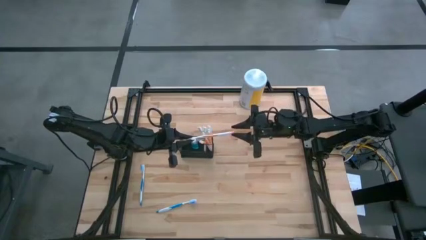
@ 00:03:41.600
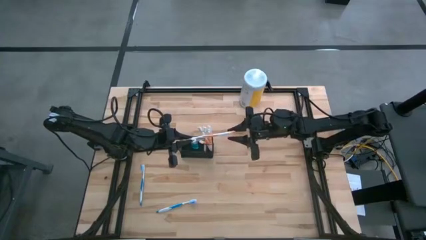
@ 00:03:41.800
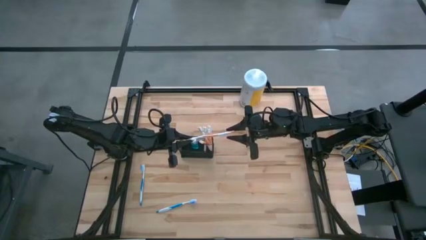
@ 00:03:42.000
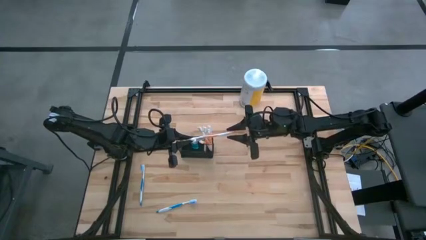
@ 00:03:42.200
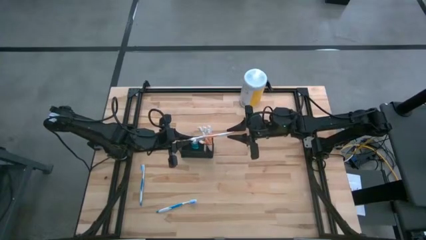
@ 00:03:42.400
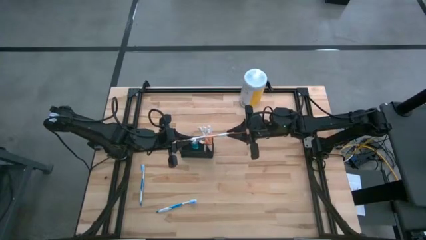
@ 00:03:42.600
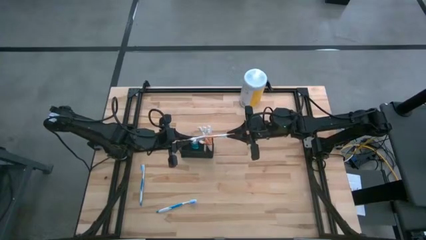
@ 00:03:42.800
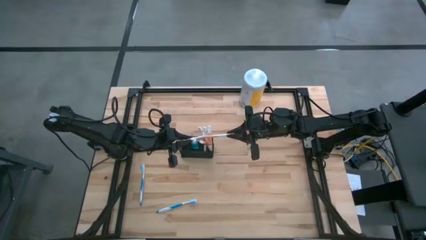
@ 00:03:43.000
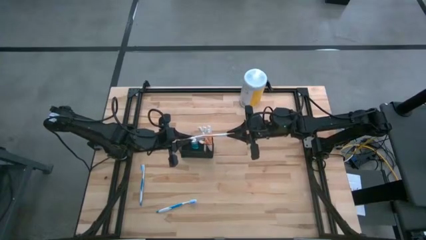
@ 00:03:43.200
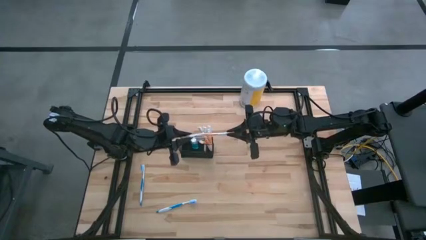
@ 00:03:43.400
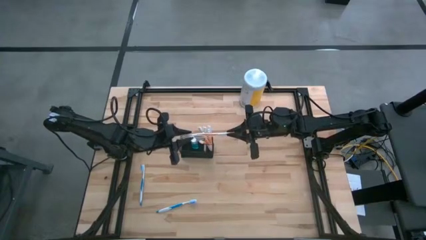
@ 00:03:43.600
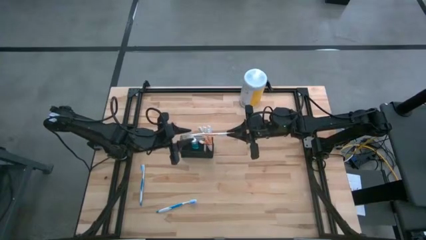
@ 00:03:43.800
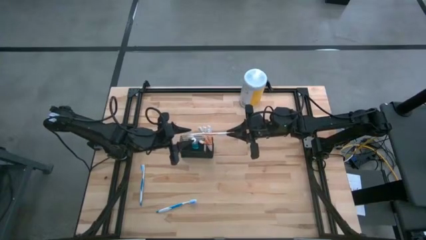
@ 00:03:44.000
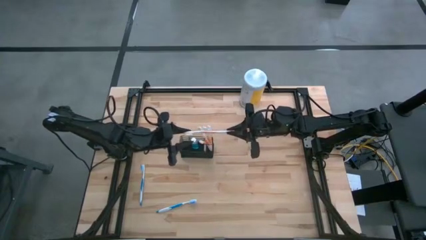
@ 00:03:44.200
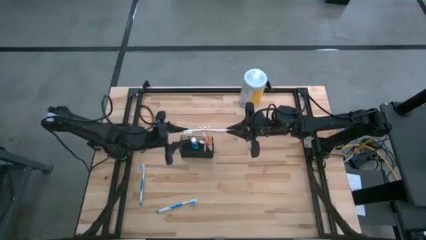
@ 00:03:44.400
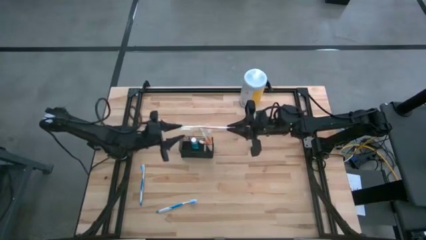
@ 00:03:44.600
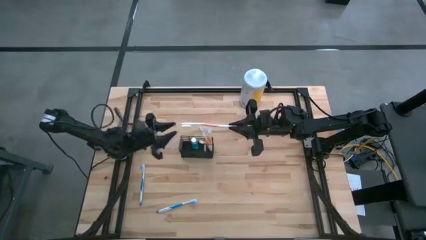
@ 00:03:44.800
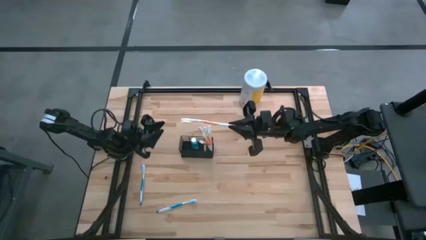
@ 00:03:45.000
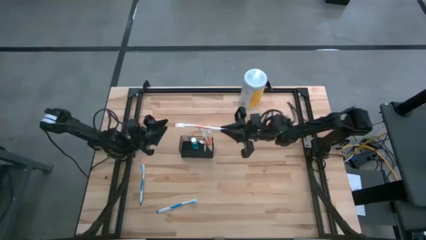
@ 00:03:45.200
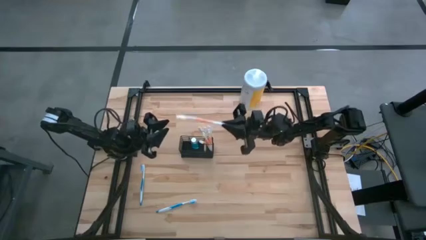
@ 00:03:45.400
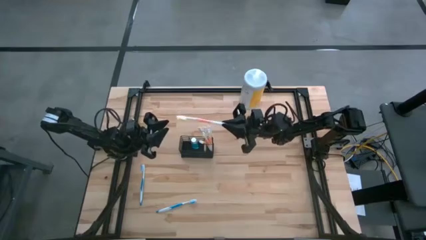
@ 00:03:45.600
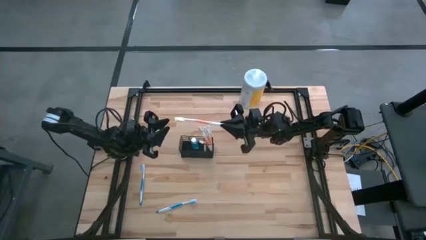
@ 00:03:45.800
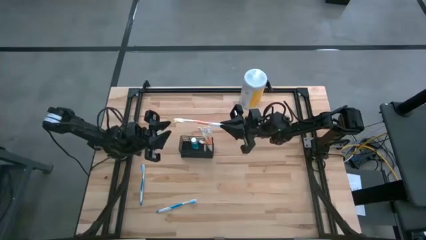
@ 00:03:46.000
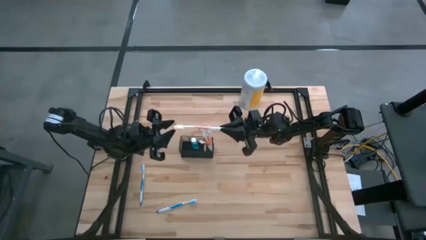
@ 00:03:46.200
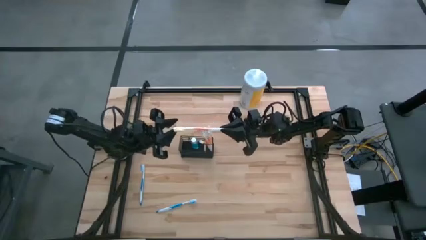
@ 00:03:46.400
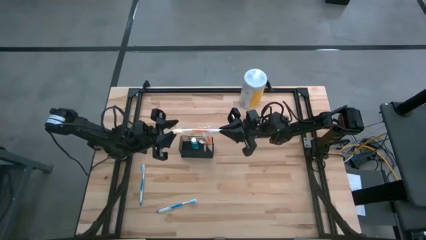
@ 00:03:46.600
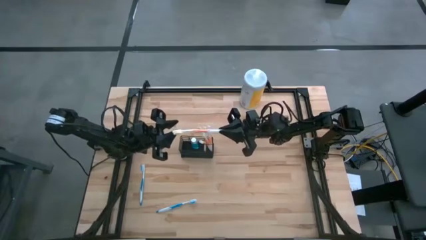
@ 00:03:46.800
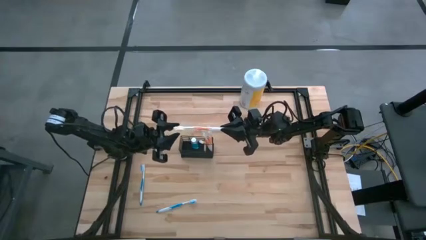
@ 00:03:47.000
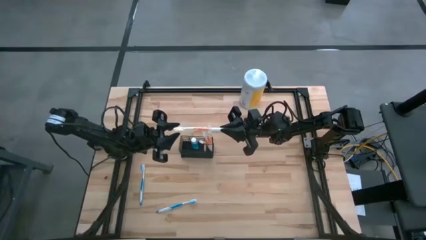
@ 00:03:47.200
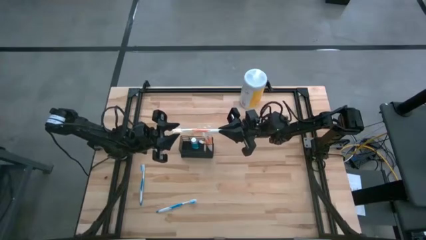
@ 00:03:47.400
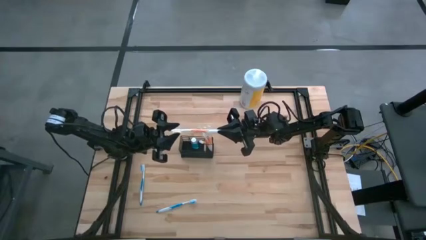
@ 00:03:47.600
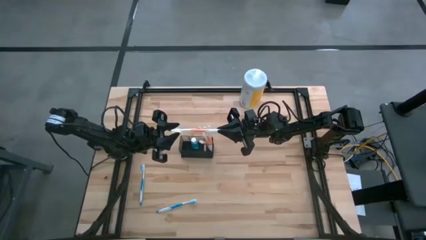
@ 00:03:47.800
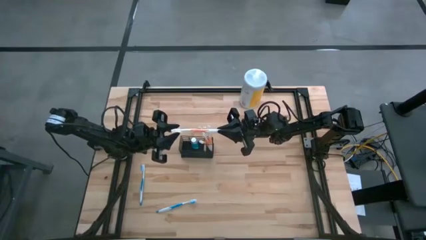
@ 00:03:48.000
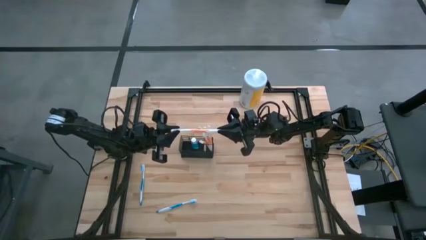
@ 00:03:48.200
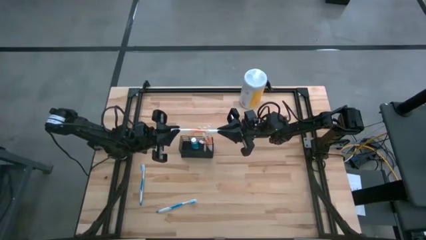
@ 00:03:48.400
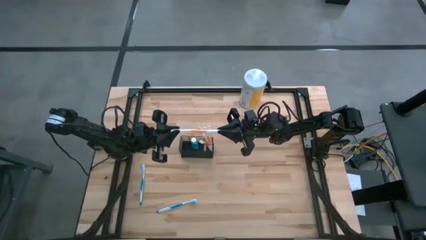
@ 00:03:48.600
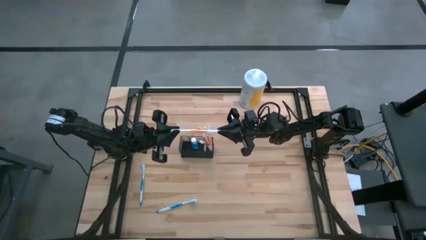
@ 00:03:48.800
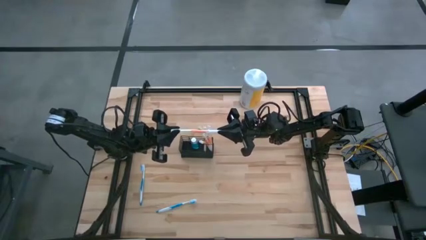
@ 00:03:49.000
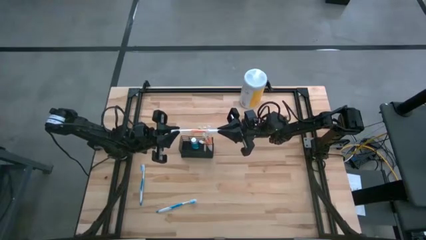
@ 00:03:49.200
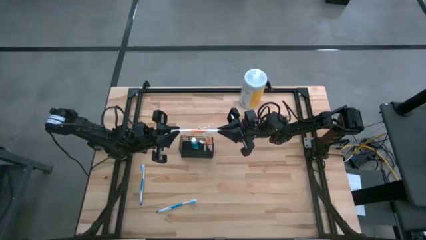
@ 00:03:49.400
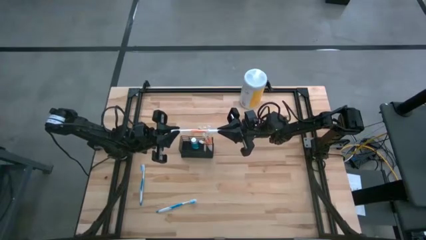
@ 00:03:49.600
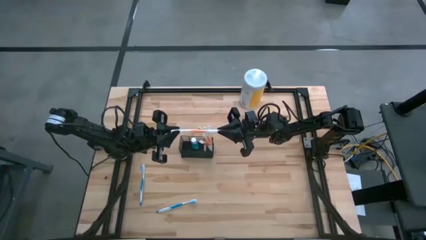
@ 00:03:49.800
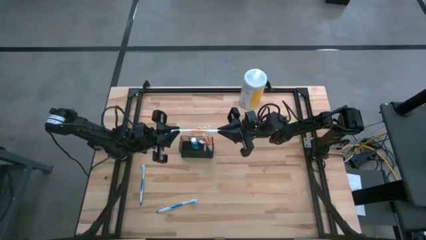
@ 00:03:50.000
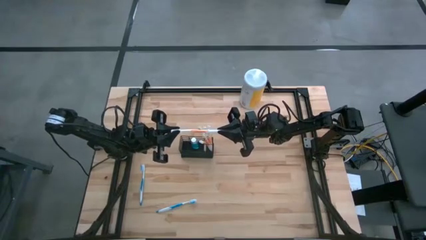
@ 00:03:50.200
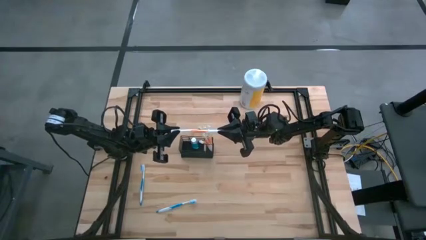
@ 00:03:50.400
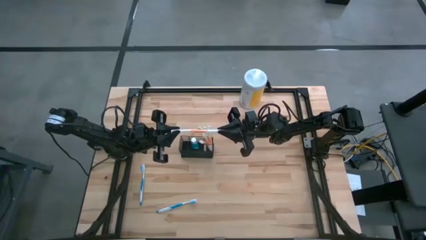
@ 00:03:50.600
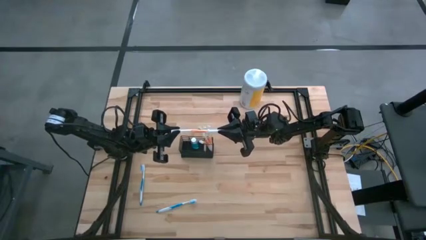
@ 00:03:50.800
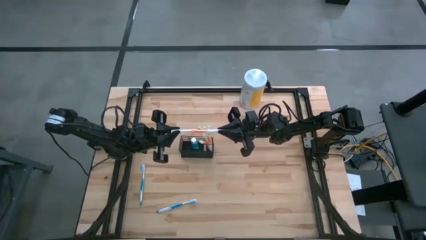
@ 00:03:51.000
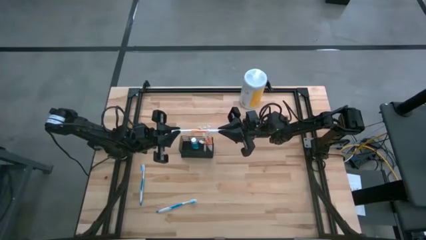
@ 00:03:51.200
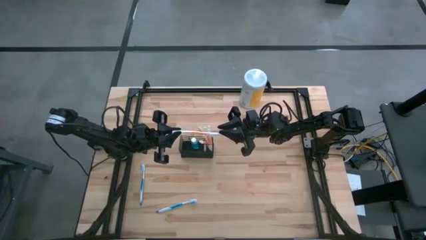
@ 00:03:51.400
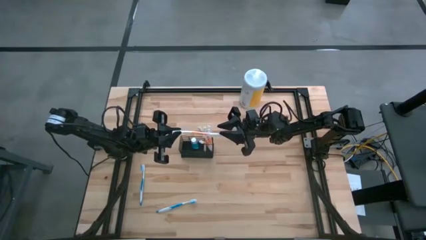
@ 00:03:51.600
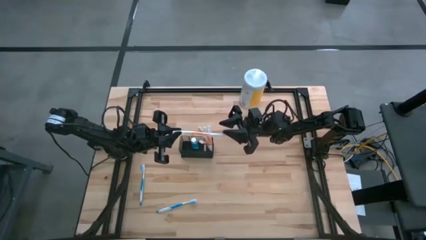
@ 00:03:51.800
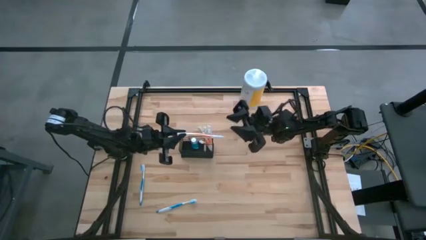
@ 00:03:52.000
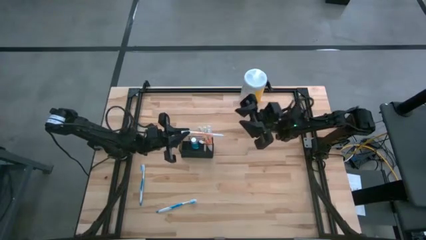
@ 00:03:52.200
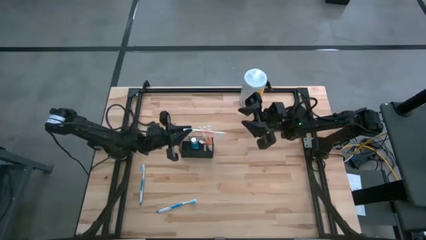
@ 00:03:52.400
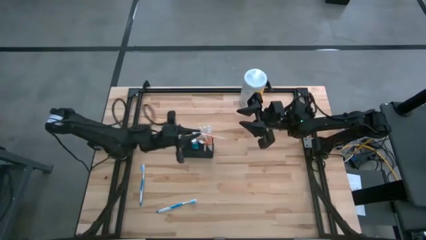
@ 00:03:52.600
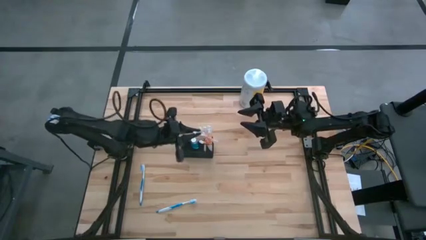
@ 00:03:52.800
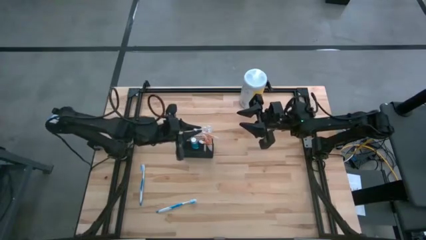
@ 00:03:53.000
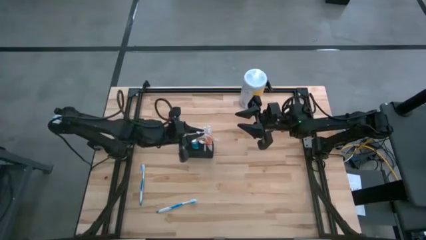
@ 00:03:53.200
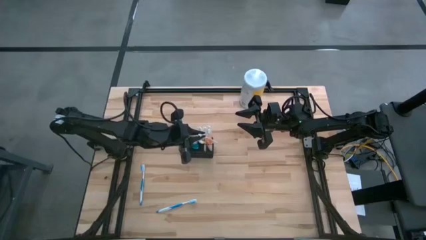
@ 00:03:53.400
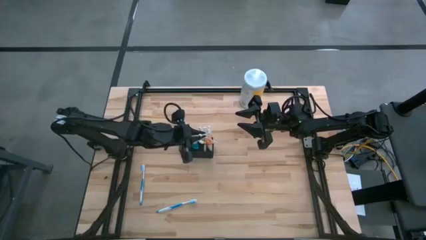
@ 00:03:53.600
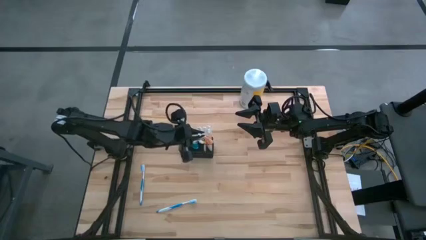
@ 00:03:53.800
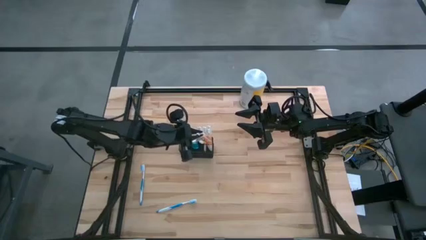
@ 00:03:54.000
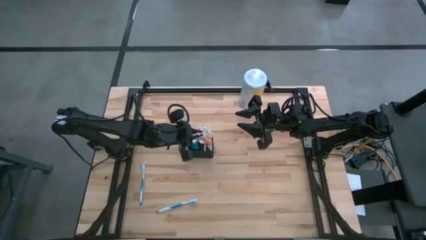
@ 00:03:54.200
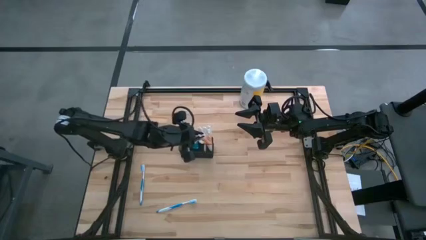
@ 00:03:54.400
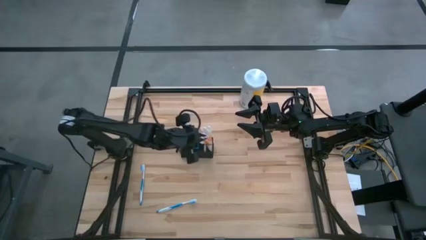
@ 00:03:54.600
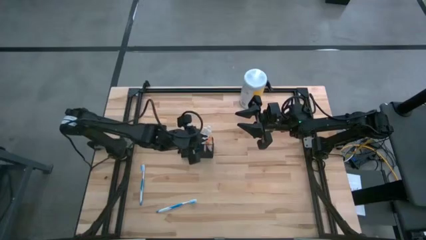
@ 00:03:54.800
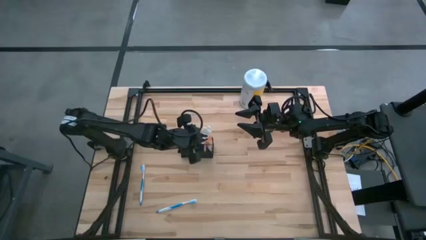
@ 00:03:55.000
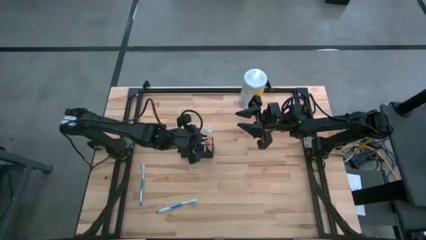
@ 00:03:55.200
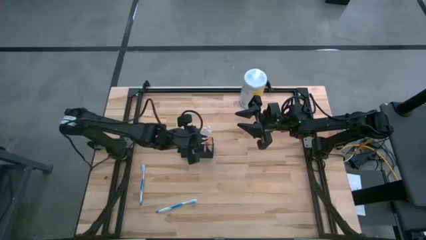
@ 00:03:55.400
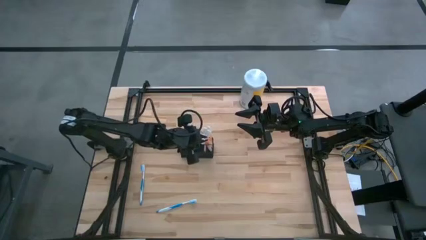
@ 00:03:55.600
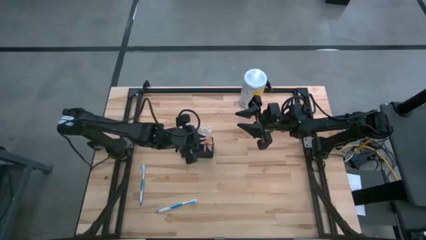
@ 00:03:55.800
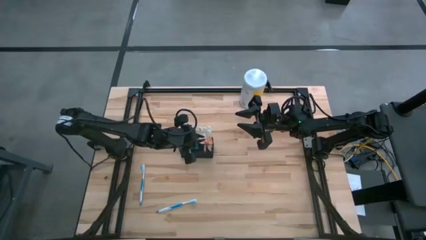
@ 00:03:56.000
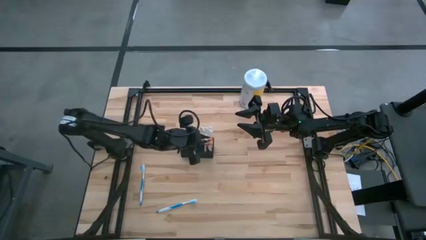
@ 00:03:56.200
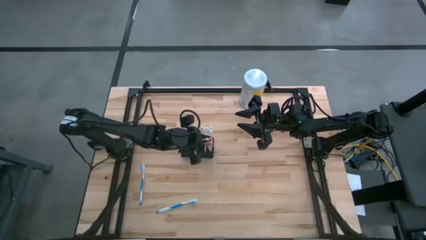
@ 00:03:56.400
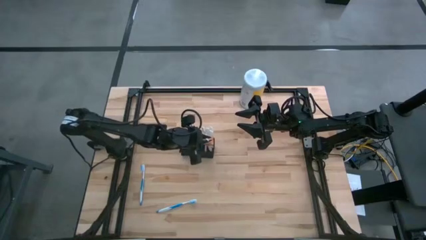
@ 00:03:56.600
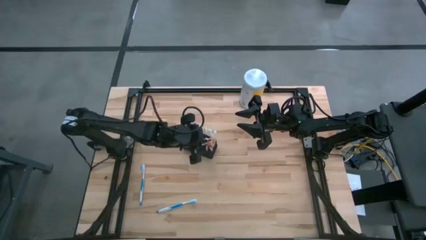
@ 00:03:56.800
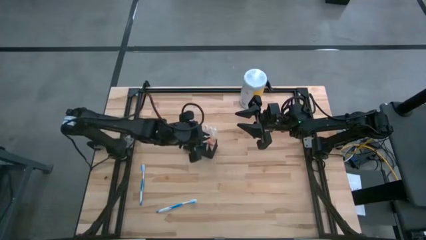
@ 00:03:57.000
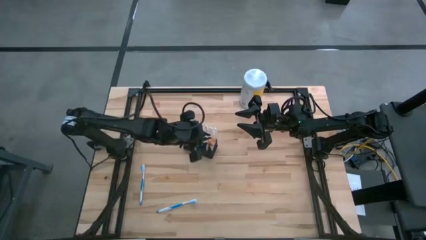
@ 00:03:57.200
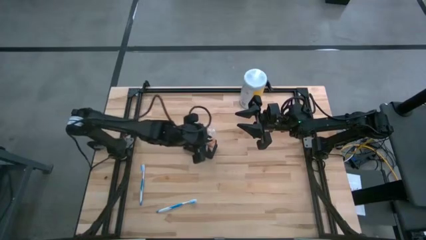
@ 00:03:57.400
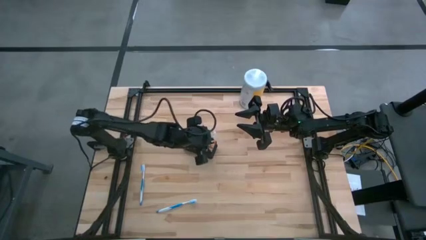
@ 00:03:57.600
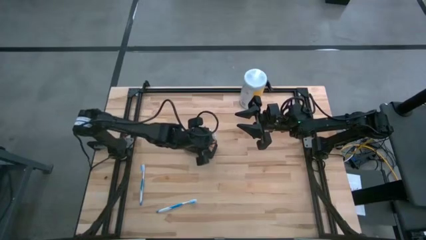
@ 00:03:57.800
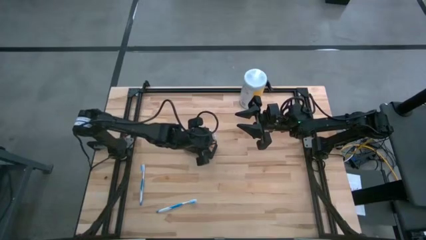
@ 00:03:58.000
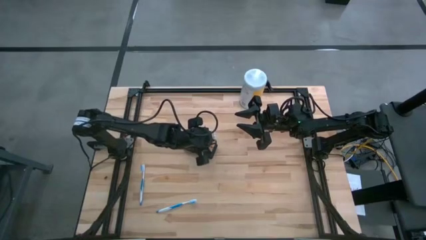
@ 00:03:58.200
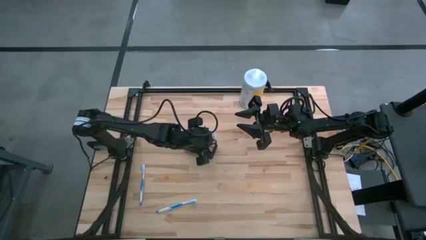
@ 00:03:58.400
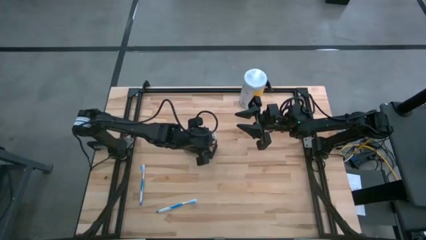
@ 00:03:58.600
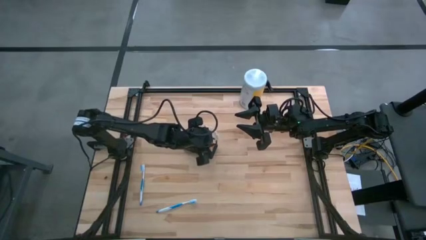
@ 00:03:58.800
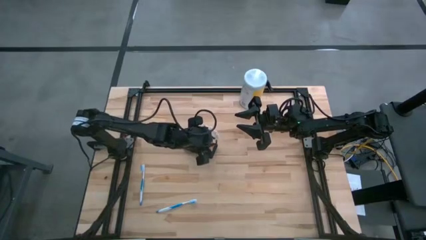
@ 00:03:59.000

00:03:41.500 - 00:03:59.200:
Task: Pick & Place toothbrushing station
Put the orange toothbrush into the right section of the wire organizer
